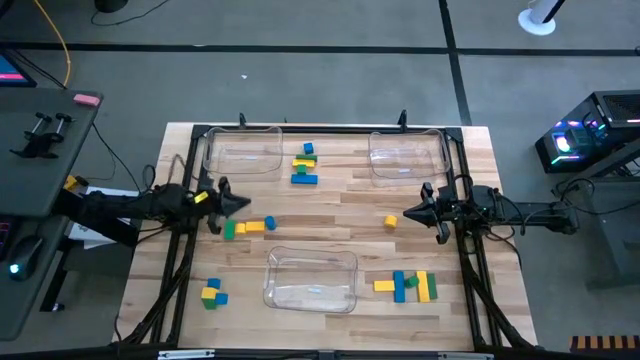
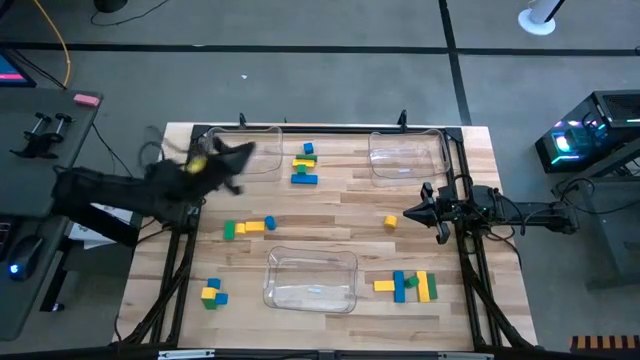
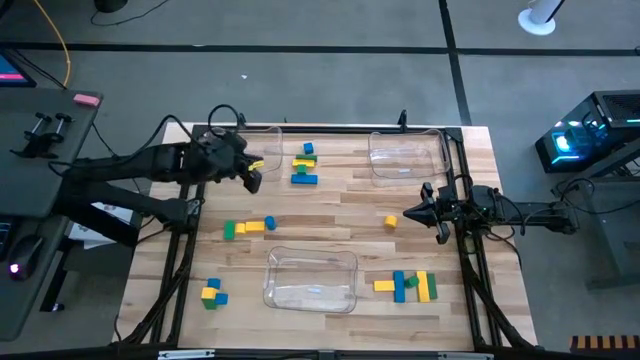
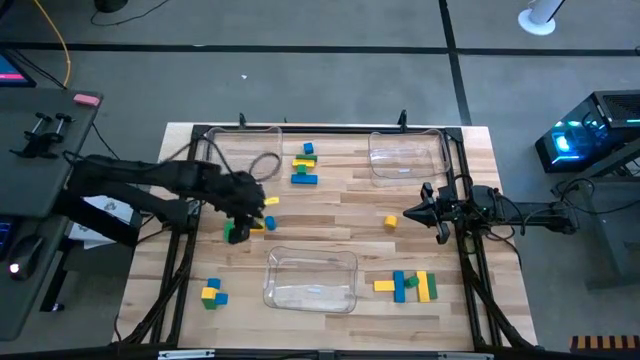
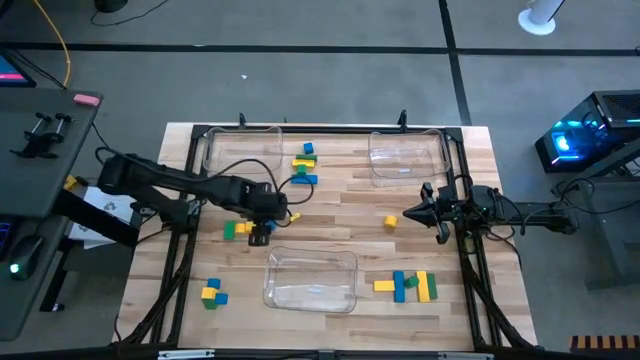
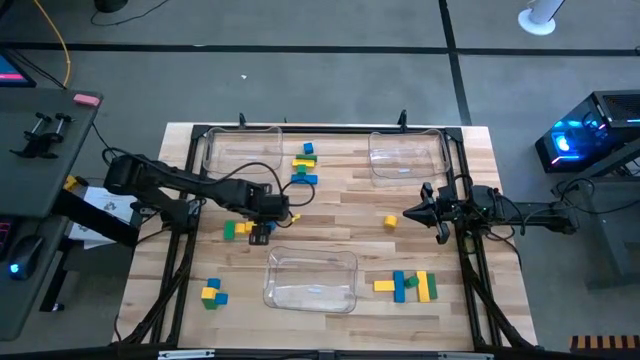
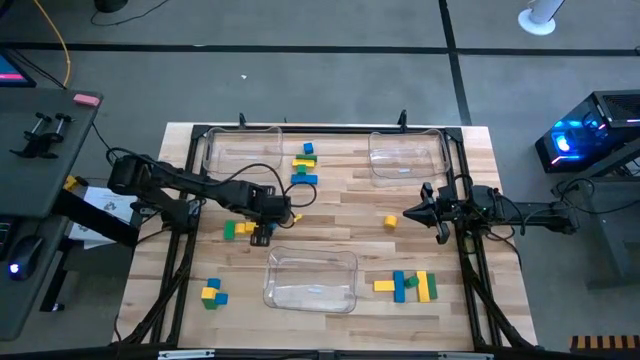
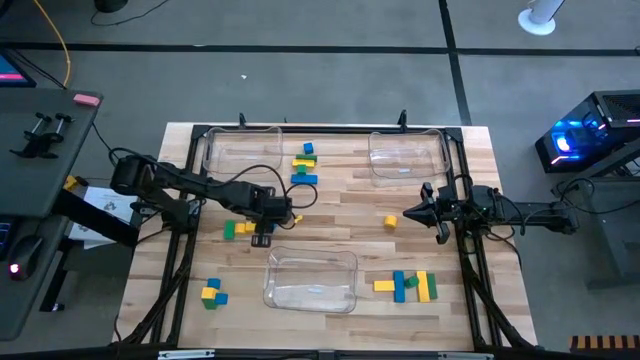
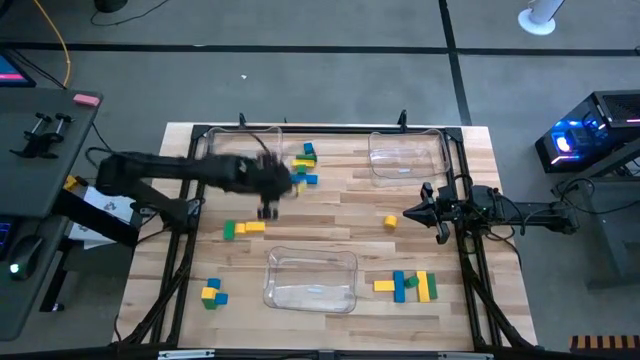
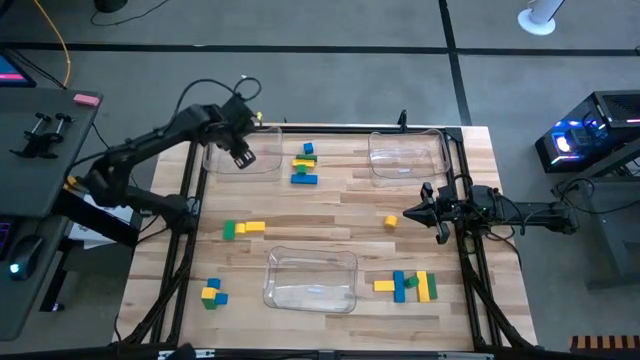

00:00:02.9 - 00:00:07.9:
Task: Sort blocks
Put the blue block into the left transparent bin

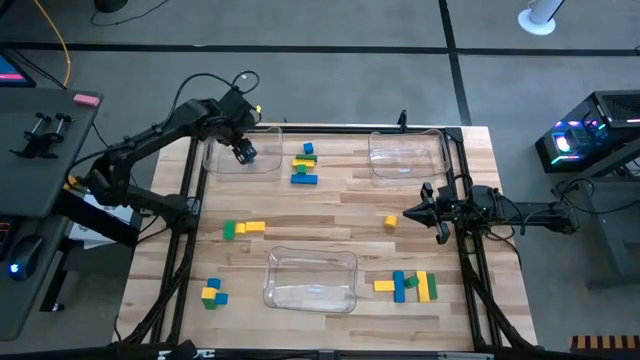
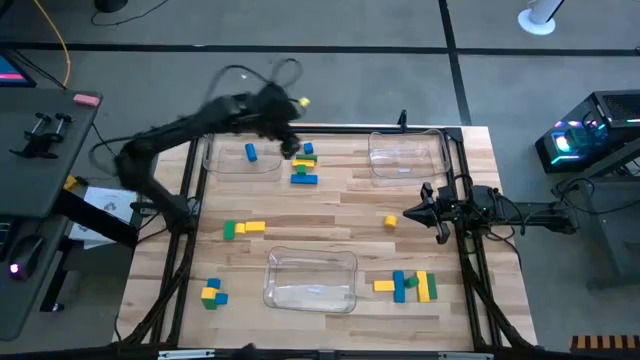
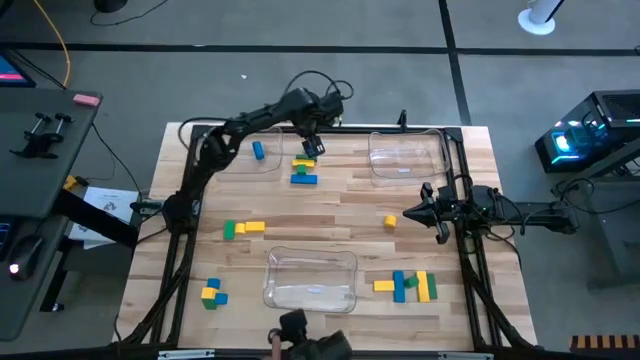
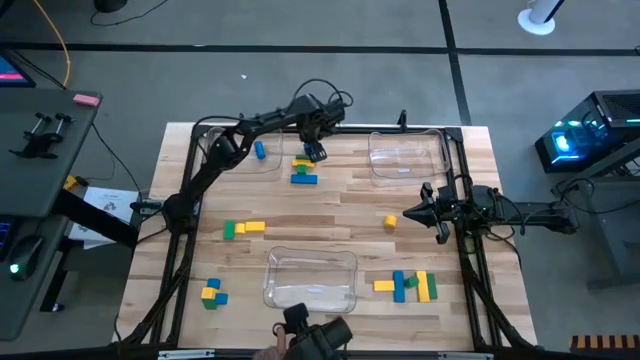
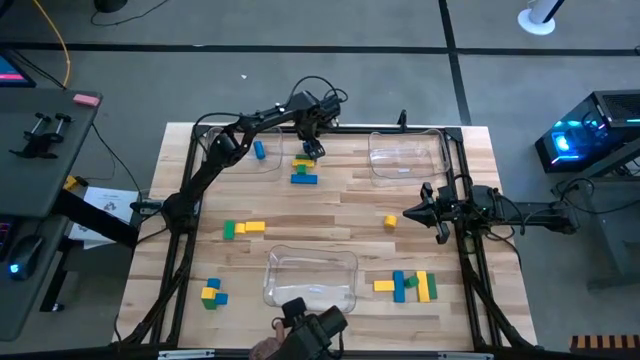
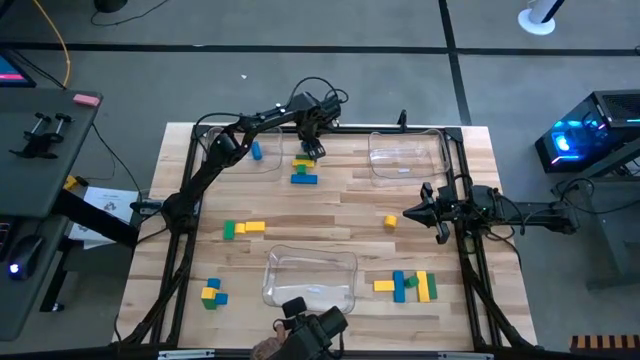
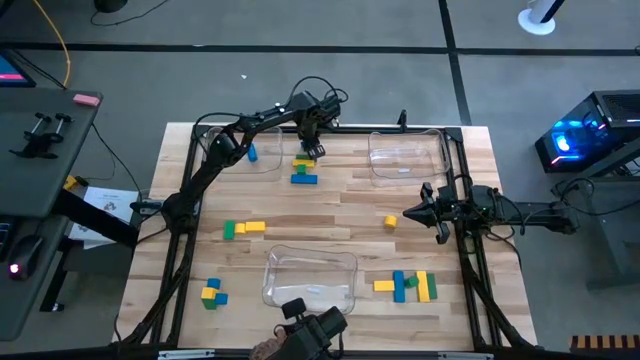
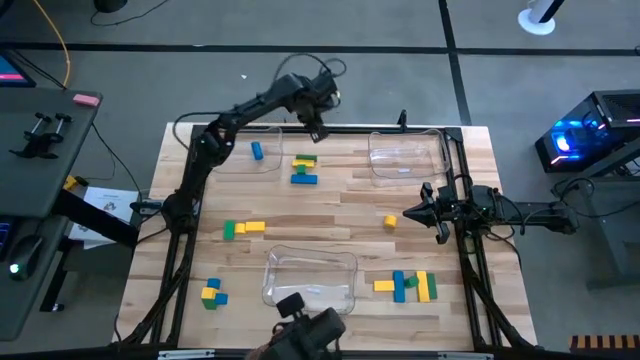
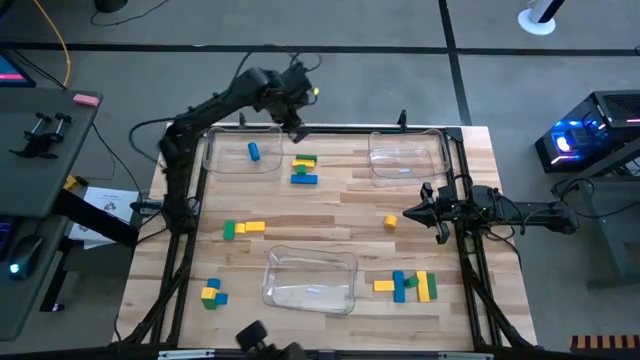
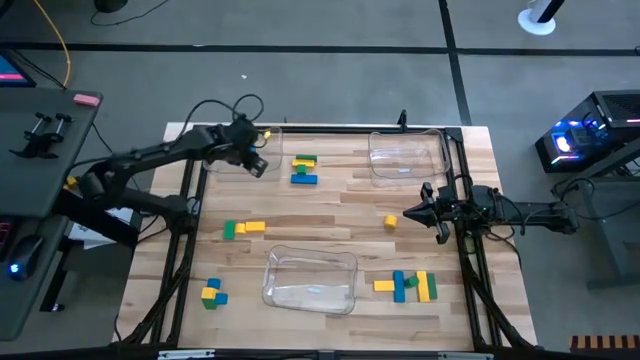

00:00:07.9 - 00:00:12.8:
Put the blue block into the left transparent bin

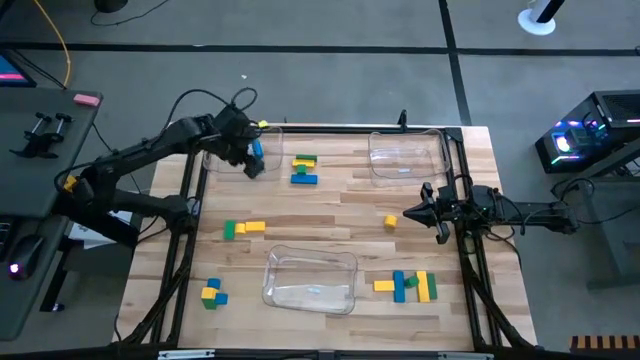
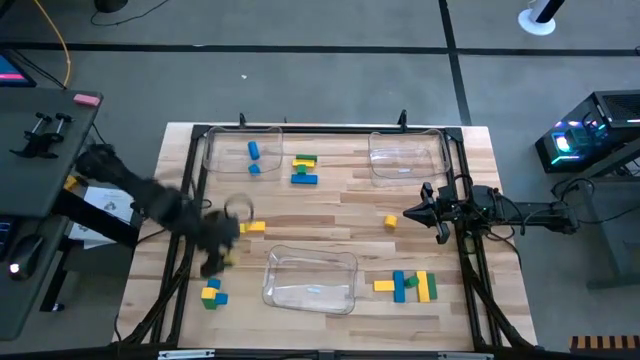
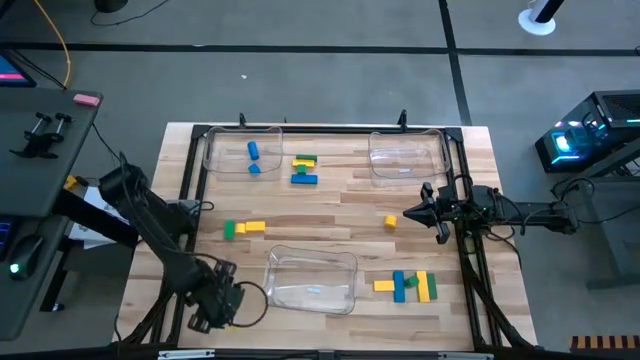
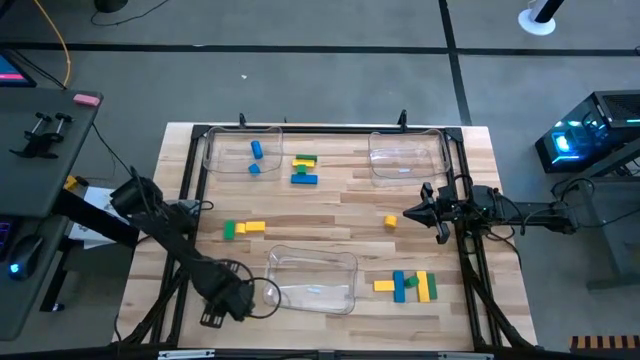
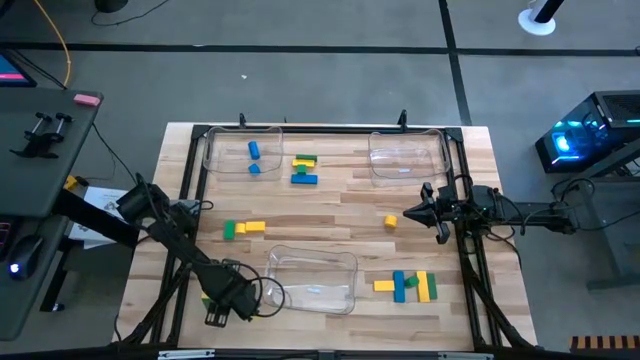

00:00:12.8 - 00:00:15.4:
Put the blue block into the left transparent bin

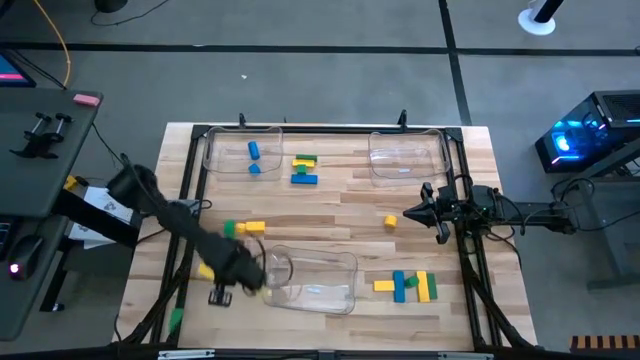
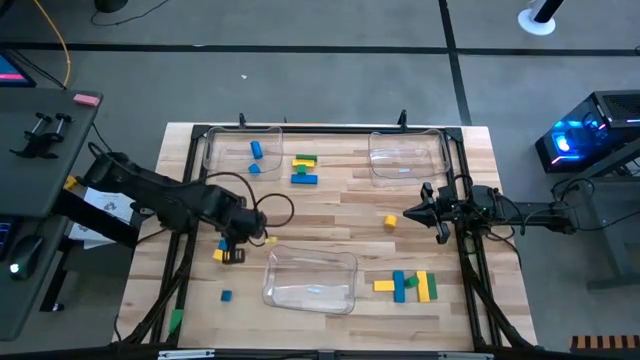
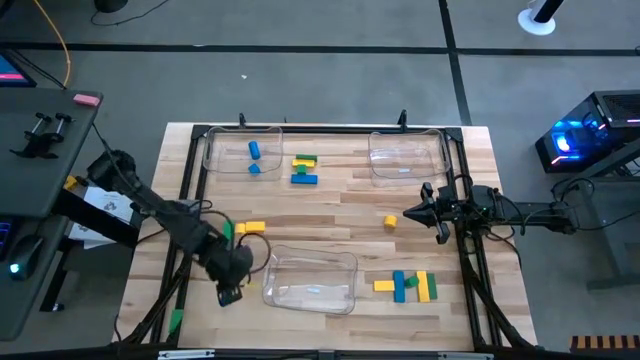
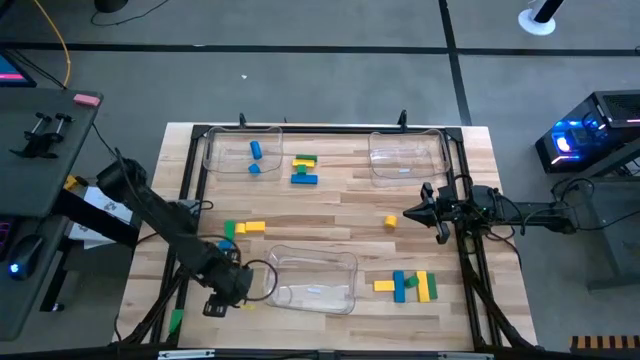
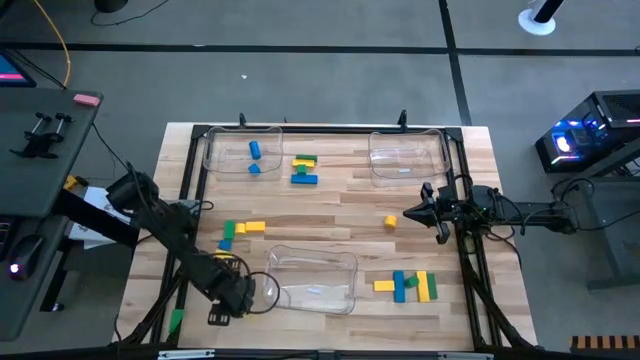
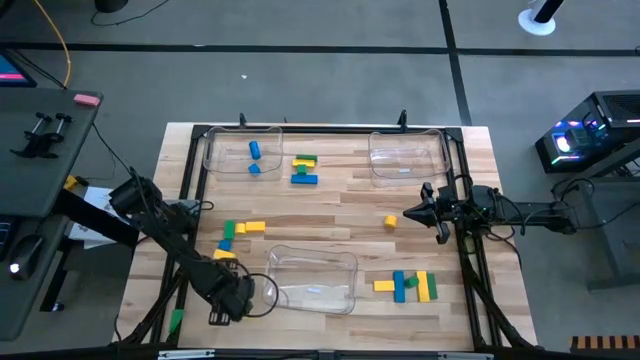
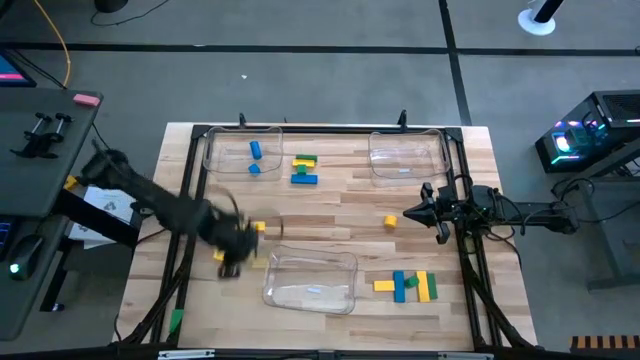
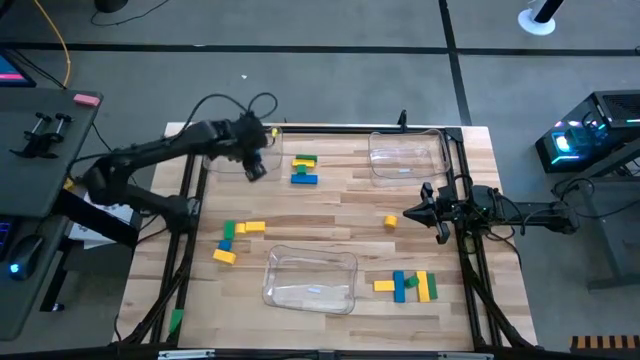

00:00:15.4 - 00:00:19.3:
Put the blue block into the left transparent bin

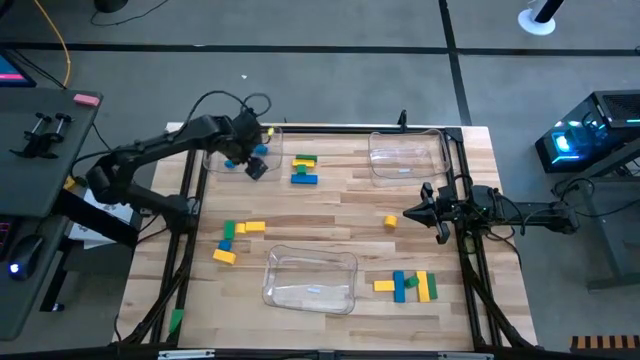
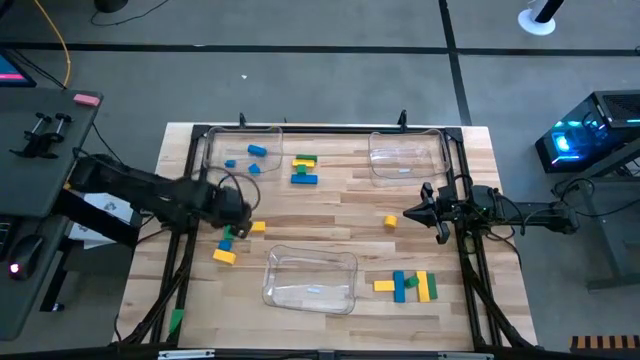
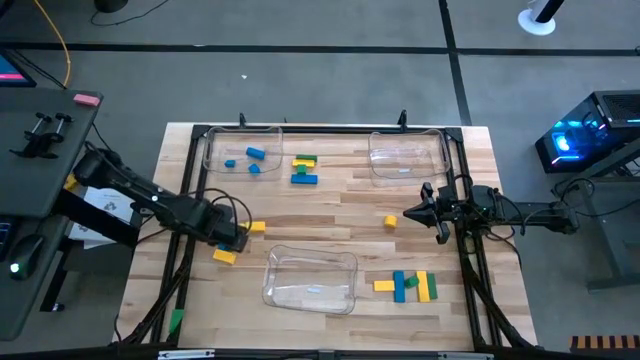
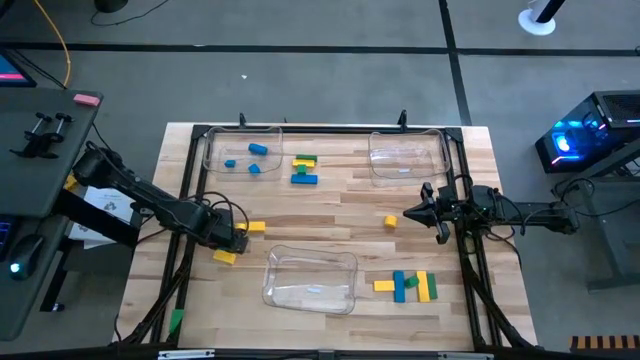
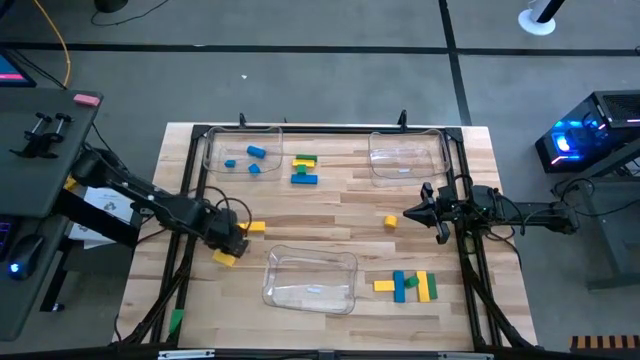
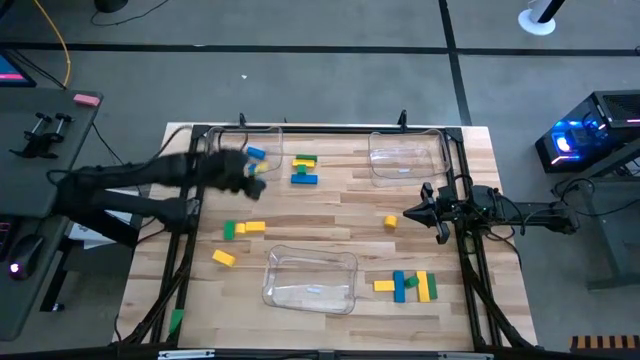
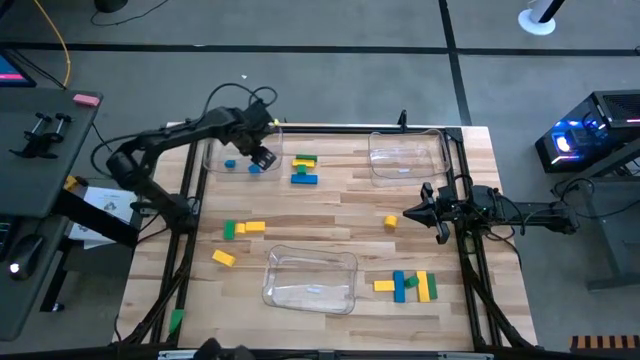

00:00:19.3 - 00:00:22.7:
Put the blue block into the left transparent bin

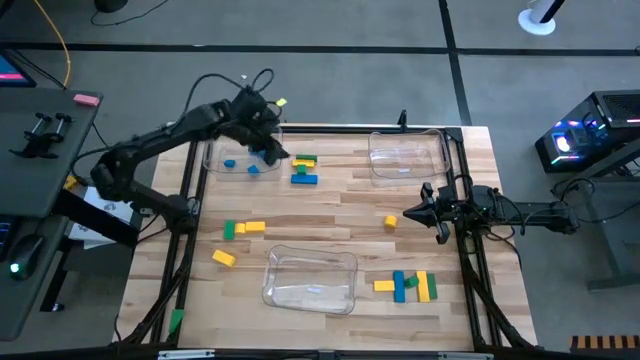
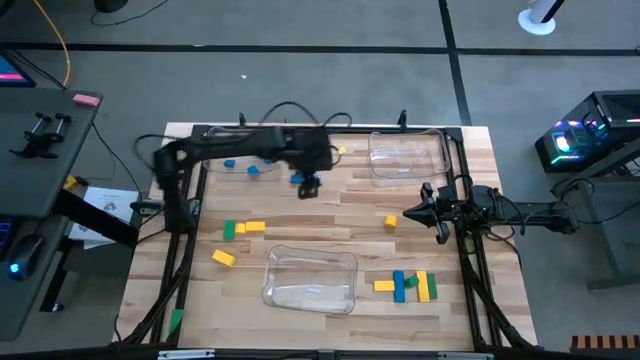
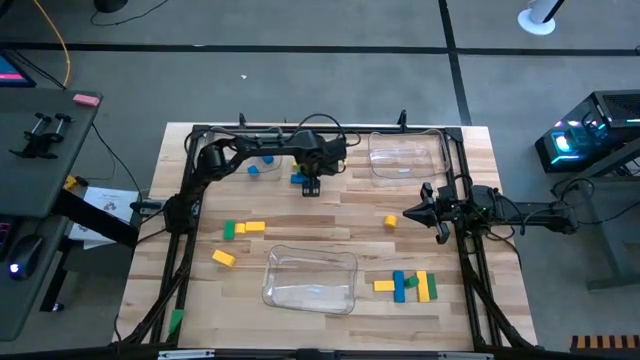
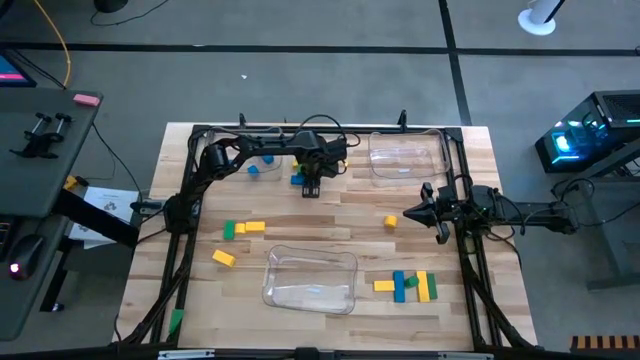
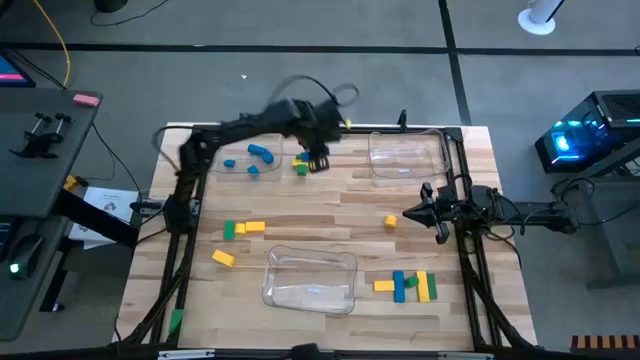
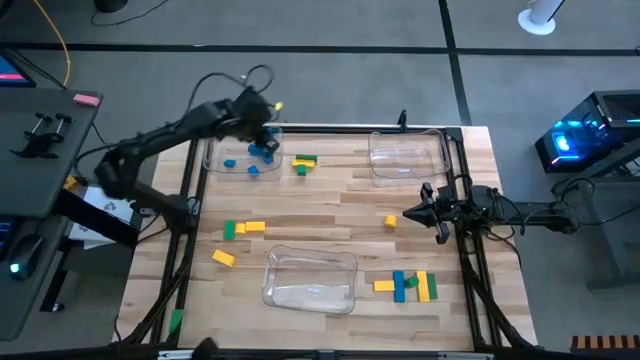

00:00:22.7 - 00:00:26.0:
Put the blue block into the left transparent bin
